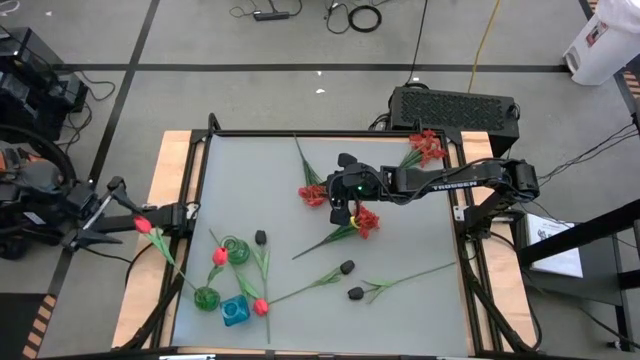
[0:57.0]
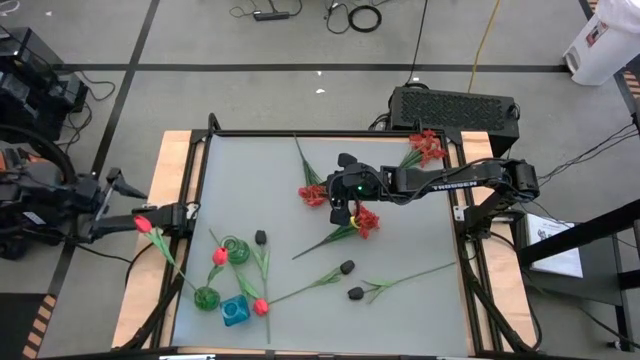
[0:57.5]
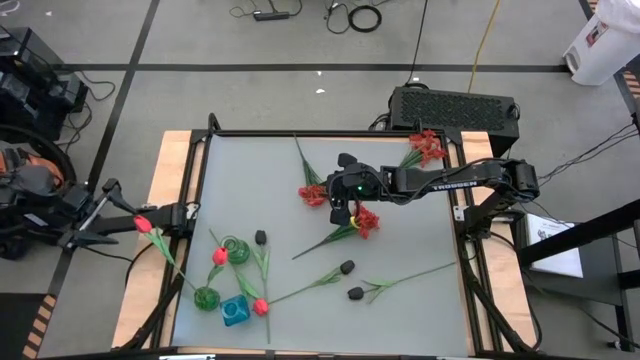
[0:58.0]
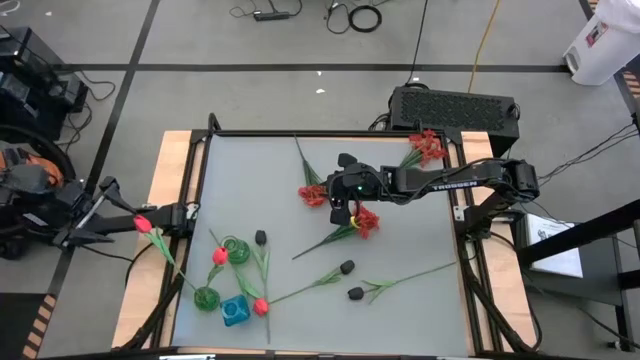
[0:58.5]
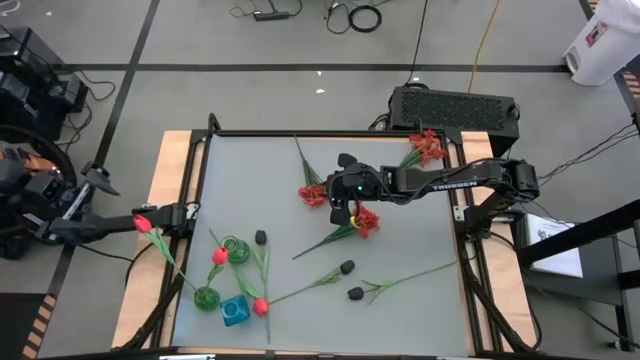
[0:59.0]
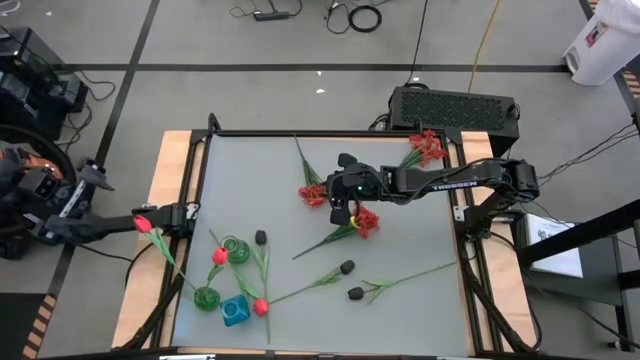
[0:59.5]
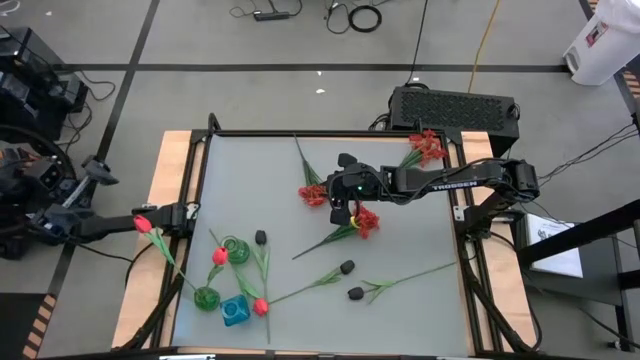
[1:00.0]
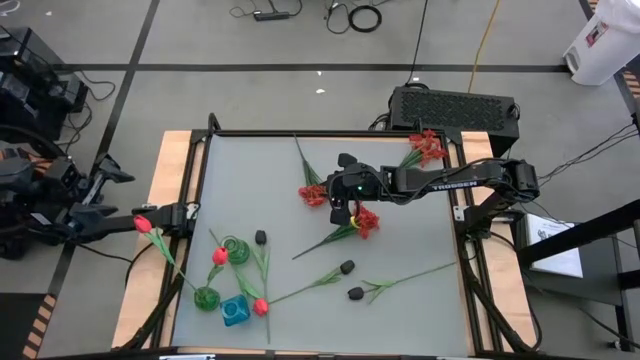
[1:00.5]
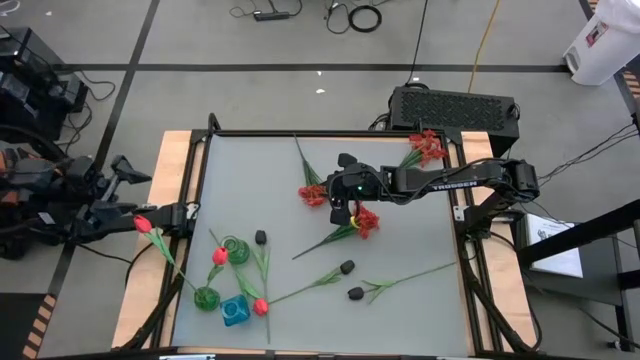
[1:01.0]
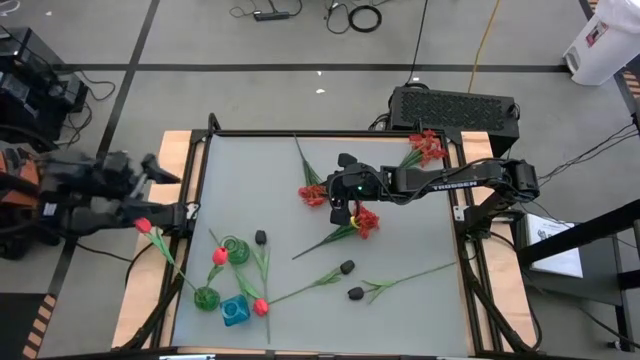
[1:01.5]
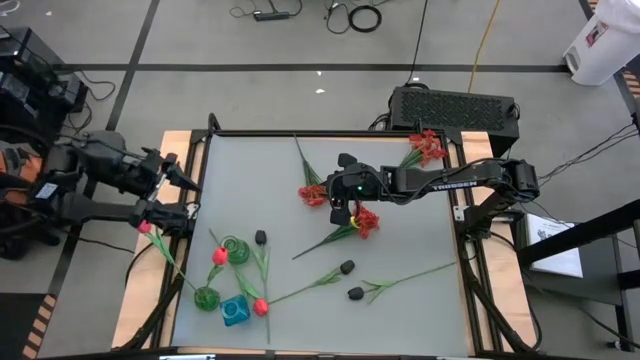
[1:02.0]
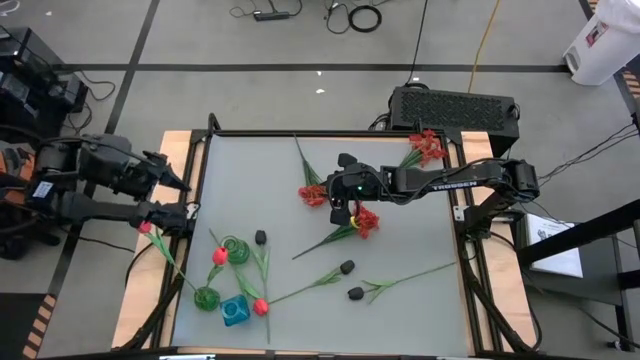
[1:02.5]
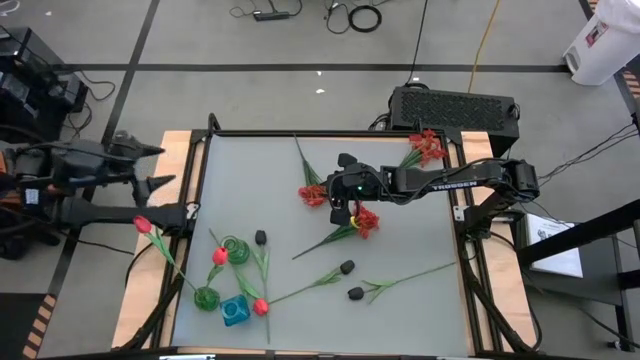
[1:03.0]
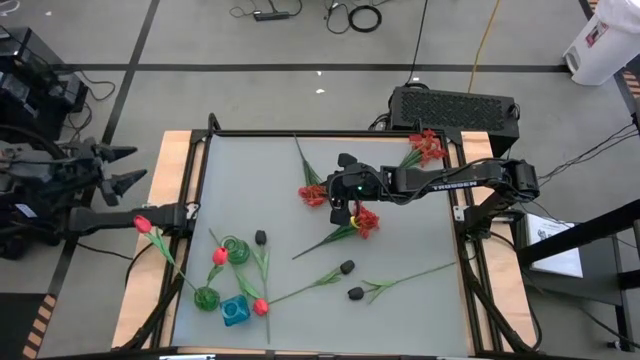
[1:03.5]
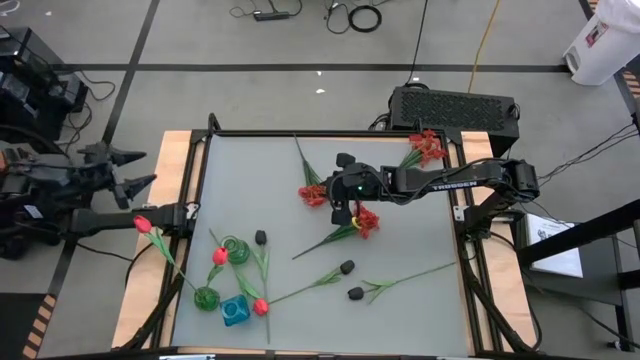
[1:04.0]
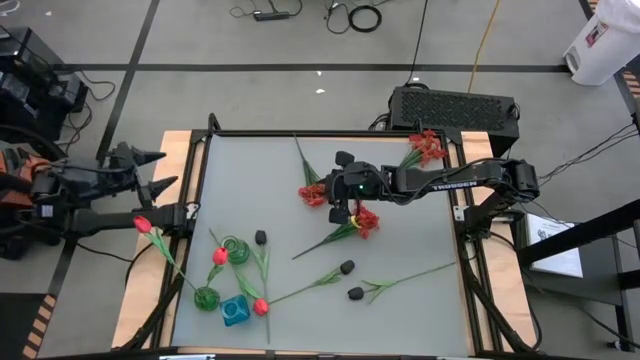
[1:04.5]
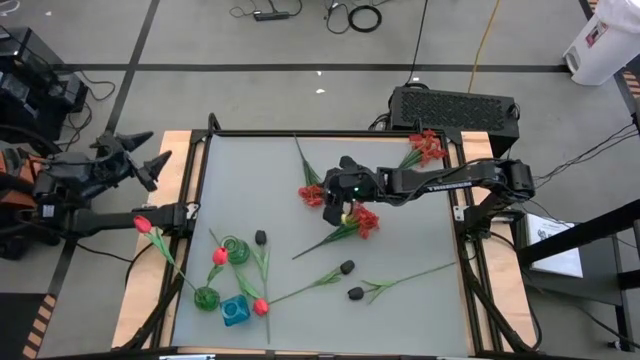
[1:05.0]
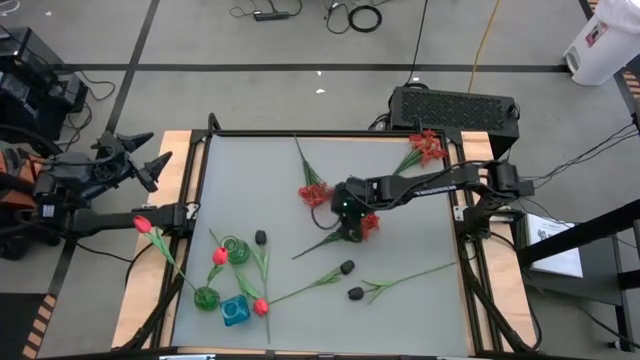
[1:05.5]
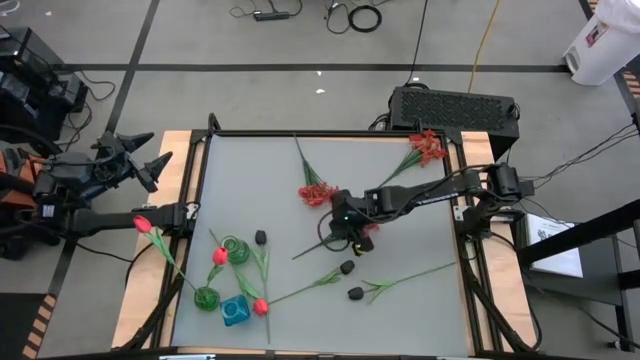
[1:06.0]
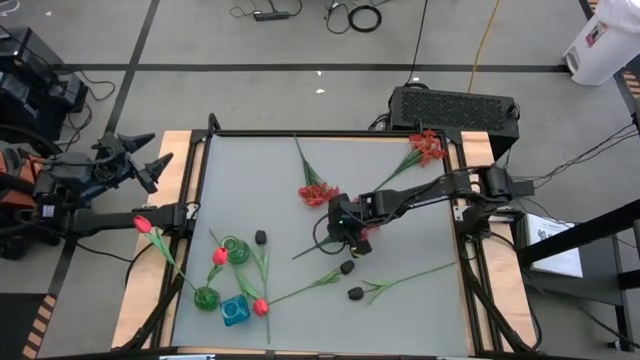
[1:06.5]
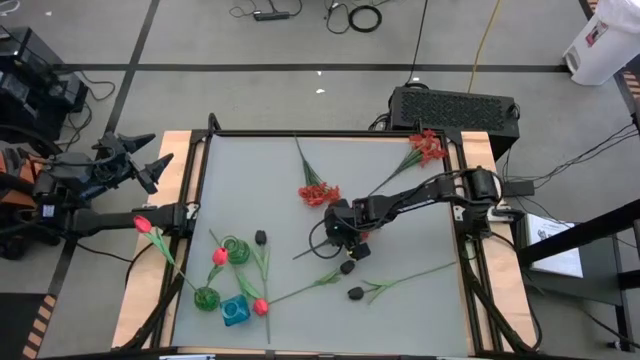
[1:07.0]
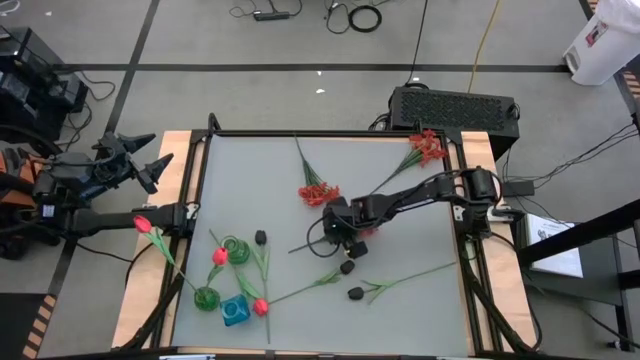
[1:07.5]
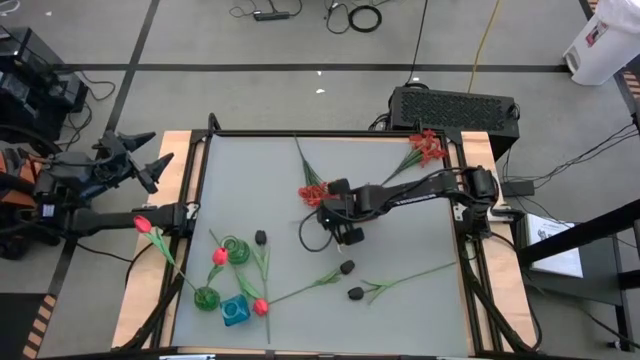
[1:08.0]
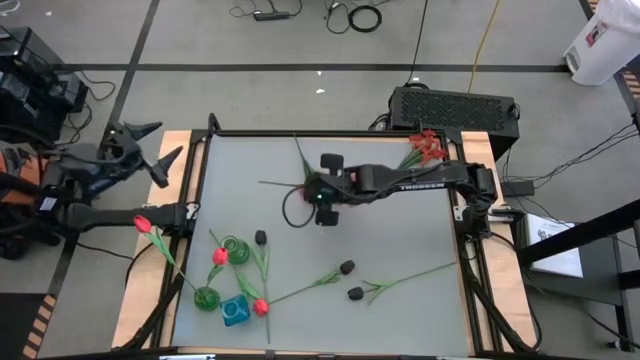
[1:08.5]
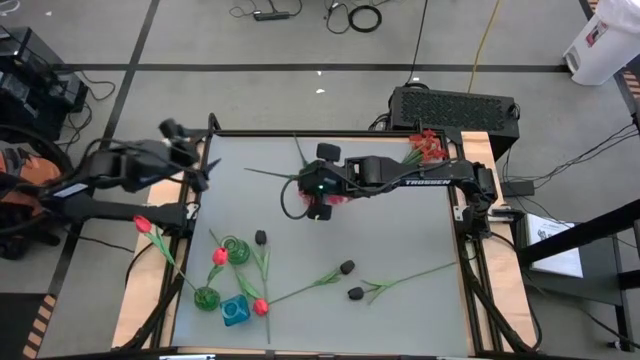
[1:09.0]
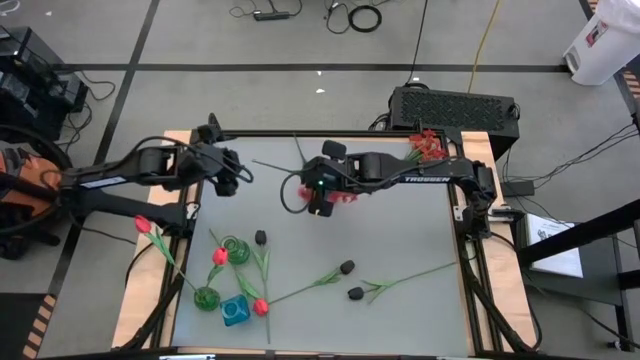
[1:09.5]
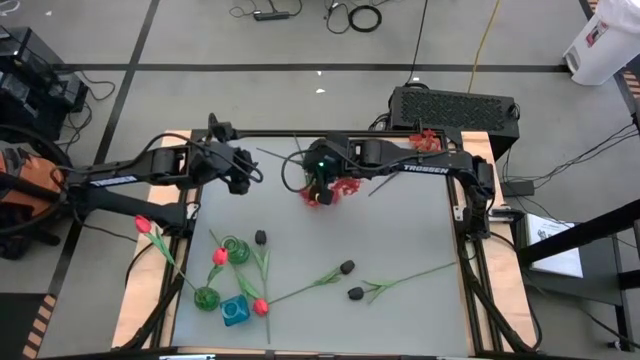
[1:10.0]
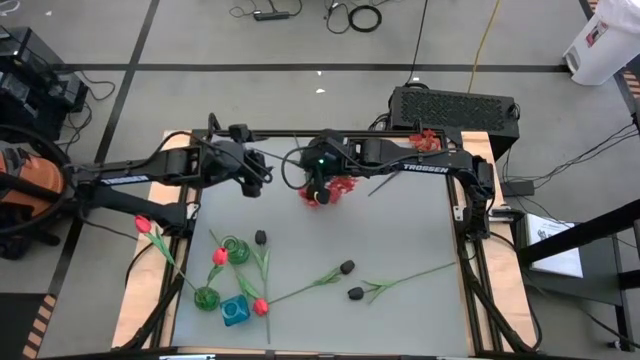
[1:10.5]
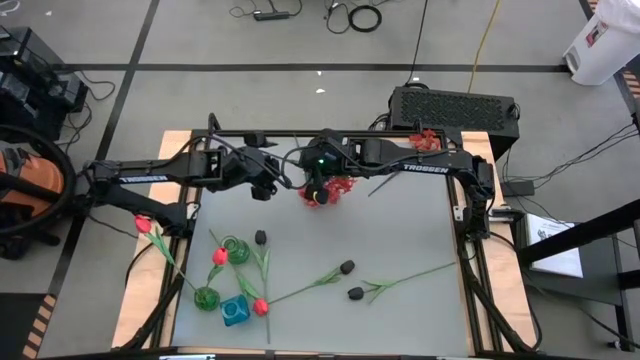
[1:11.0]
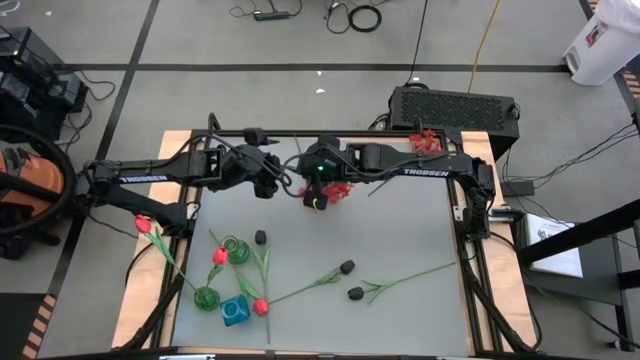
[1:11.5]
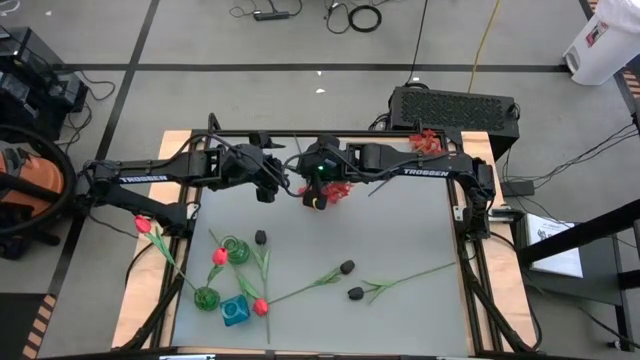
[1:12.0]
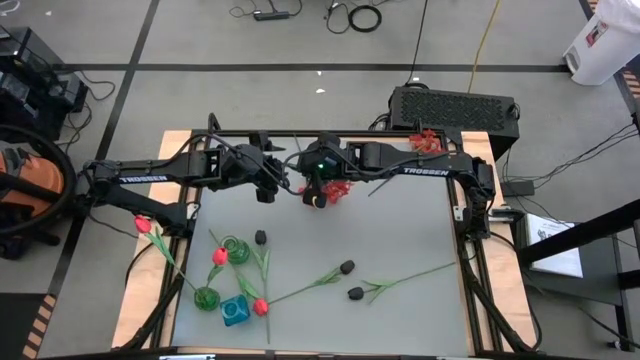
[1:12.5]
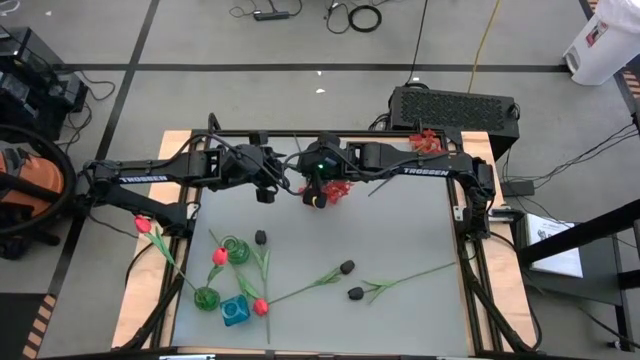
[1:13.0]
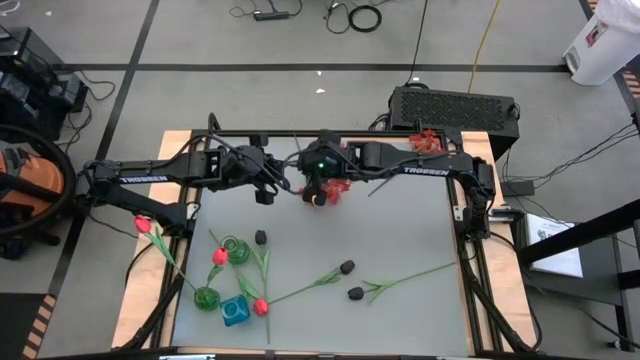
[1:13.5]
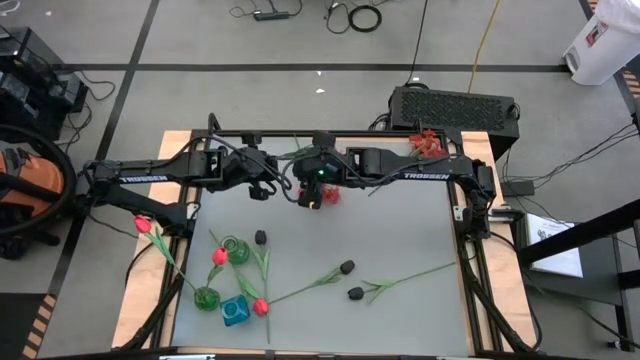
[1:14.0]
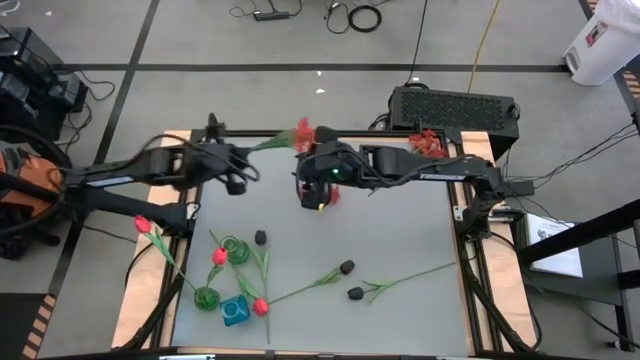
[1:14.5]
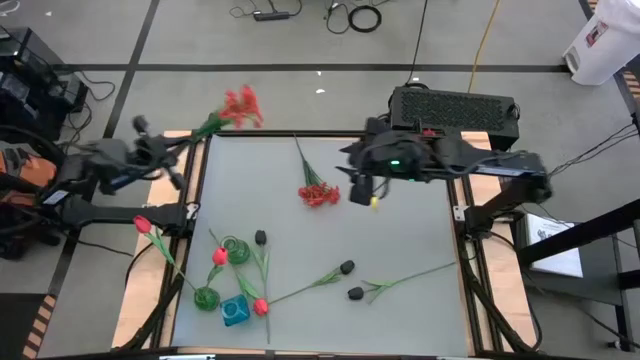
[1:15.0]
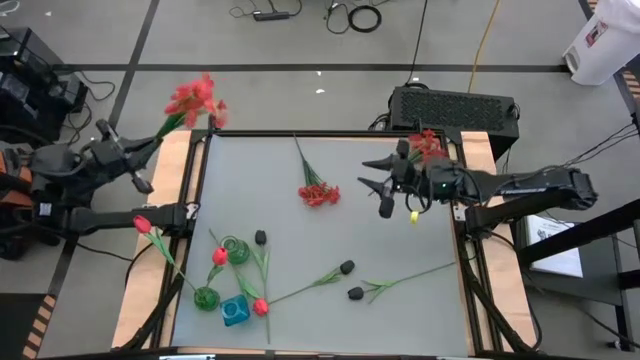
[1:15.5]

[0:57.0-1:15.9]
Task: Sort flowers into vase by color
Put the bottom orange flowers into the top green vase

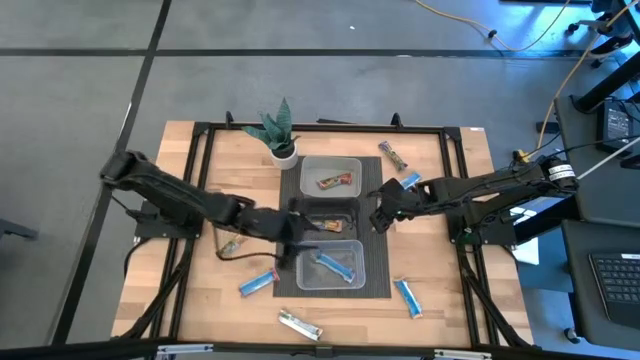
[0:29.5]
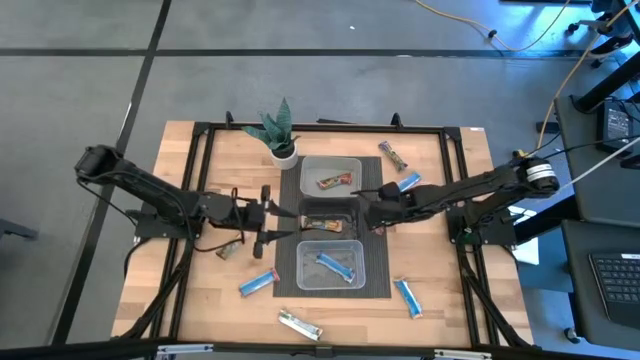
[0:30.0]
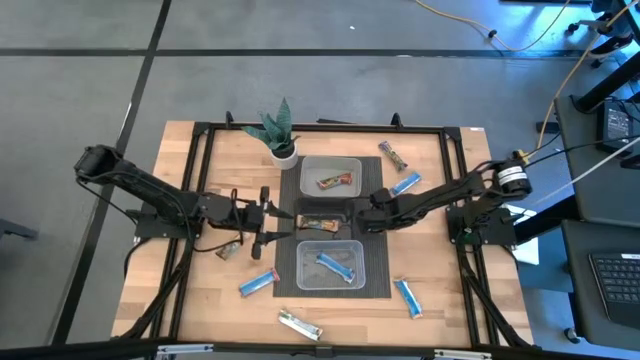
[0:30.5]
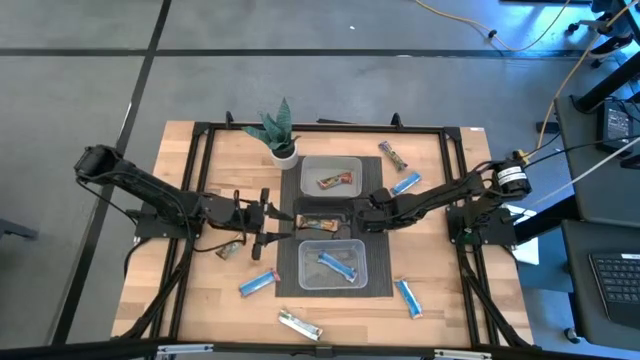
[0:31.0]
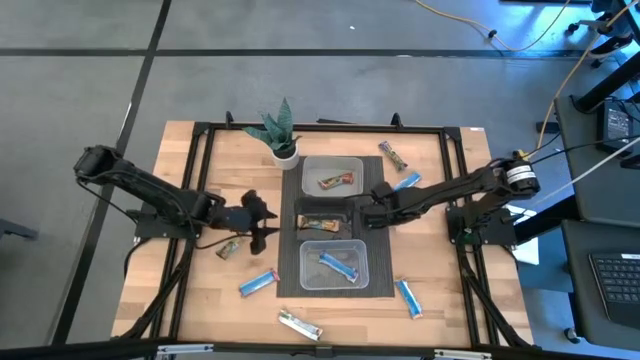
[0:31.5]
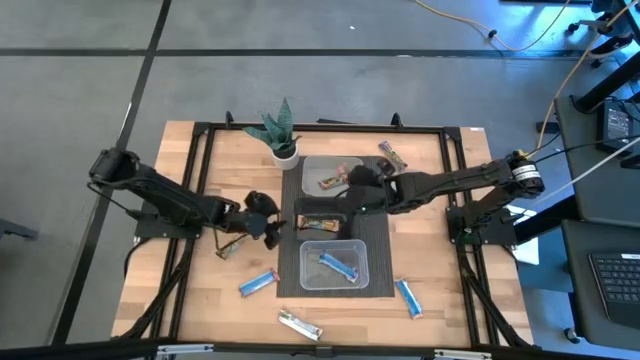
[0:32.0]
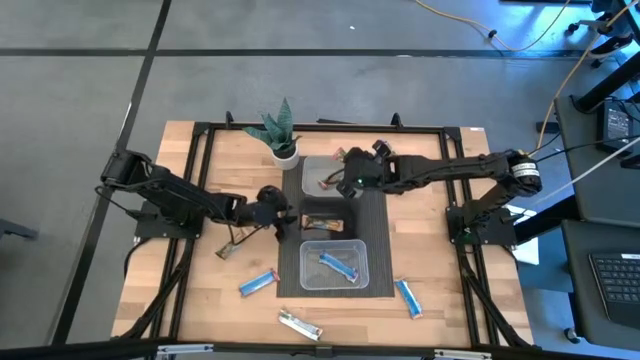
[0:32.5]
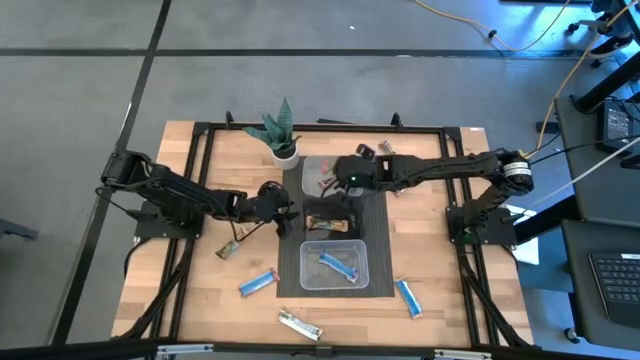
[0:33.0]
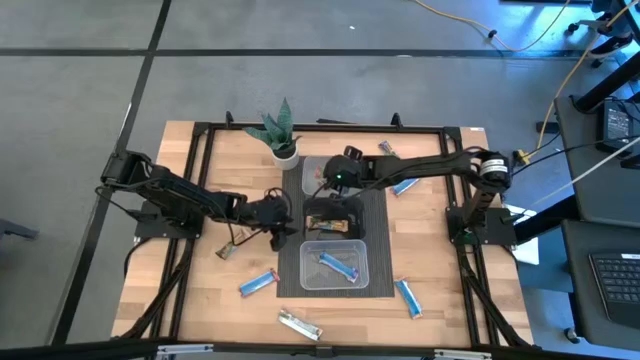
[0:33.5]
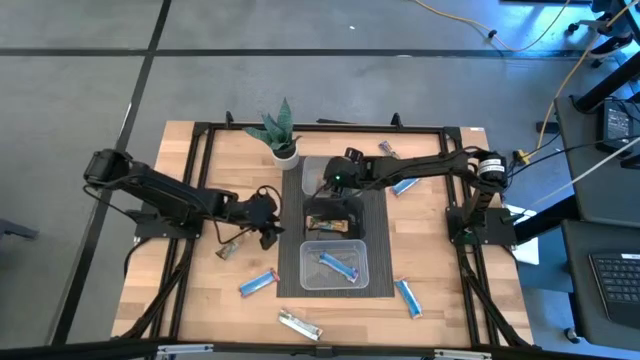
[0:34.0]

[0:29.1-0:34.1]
Task: Pick and place Granola Bars by type
Put the red granola bar into the gray bin
